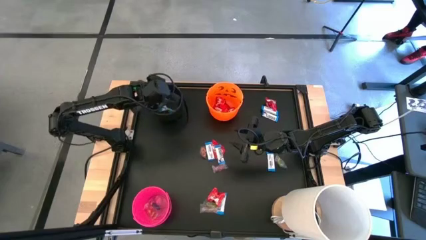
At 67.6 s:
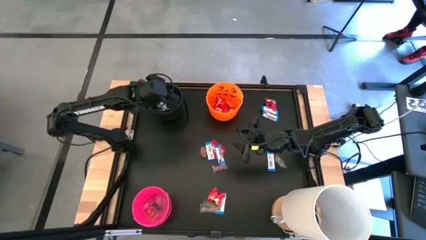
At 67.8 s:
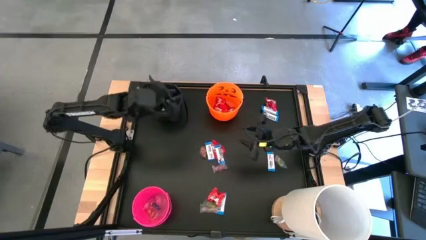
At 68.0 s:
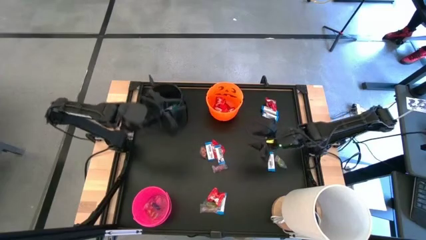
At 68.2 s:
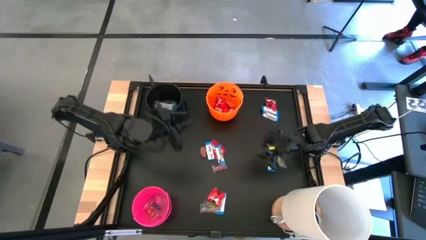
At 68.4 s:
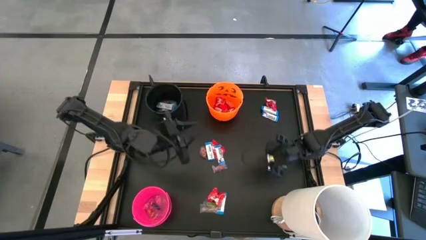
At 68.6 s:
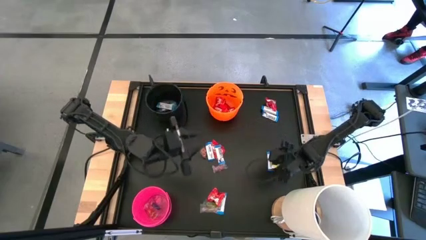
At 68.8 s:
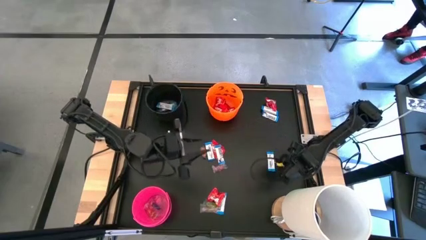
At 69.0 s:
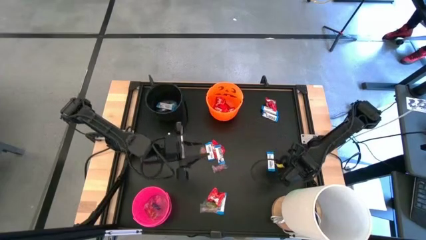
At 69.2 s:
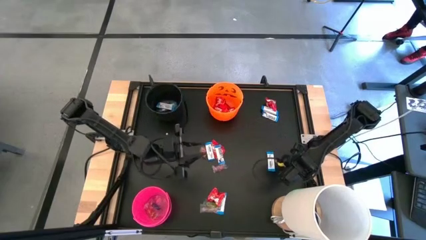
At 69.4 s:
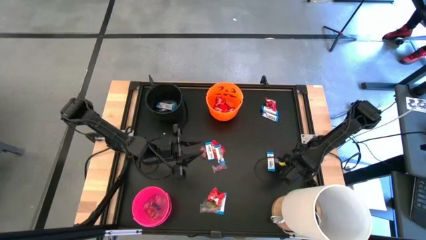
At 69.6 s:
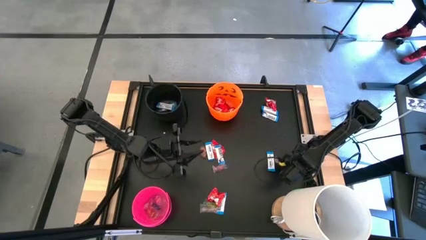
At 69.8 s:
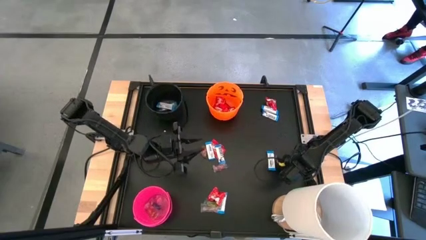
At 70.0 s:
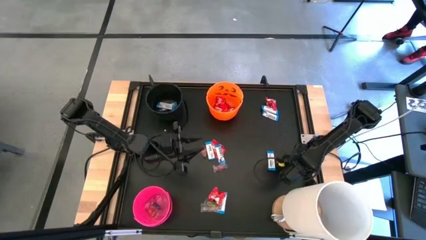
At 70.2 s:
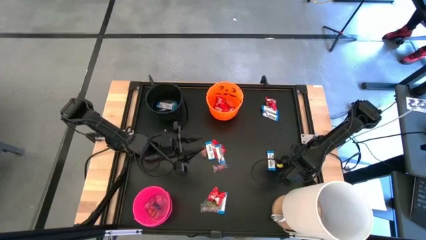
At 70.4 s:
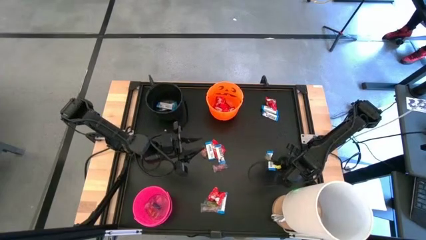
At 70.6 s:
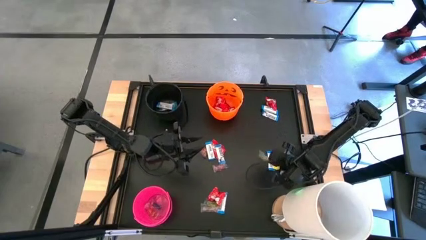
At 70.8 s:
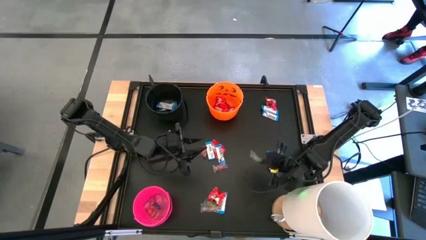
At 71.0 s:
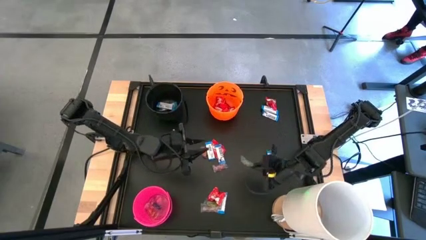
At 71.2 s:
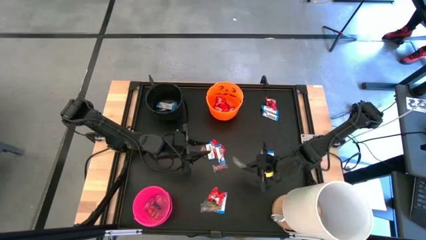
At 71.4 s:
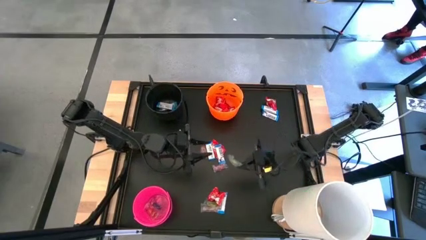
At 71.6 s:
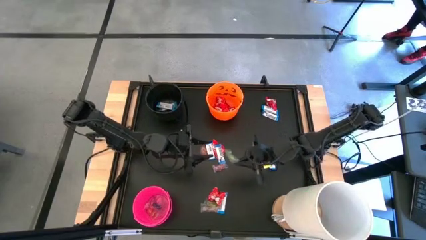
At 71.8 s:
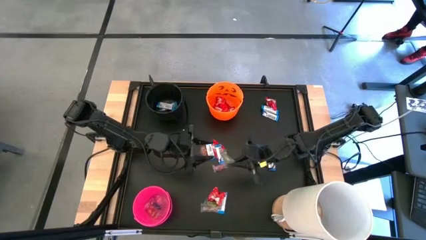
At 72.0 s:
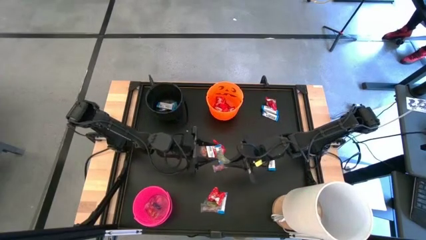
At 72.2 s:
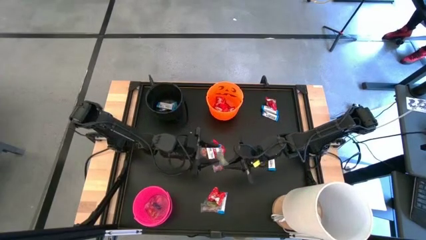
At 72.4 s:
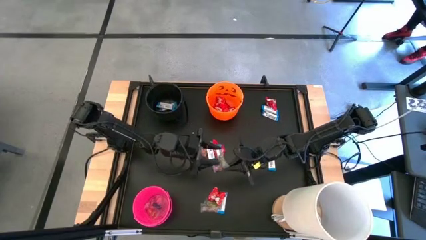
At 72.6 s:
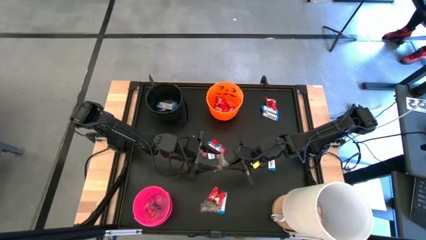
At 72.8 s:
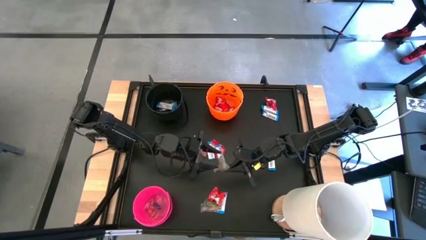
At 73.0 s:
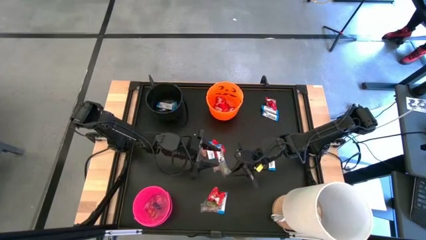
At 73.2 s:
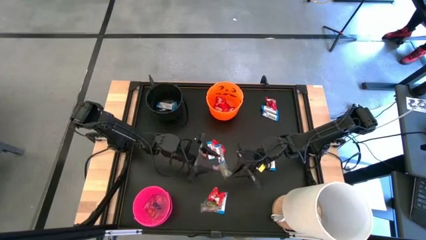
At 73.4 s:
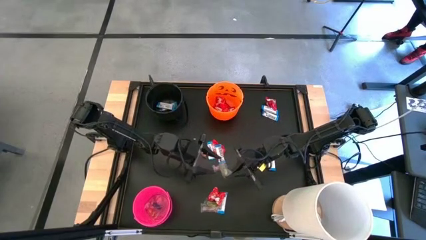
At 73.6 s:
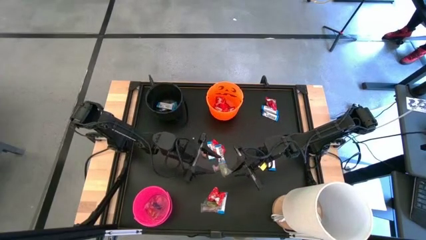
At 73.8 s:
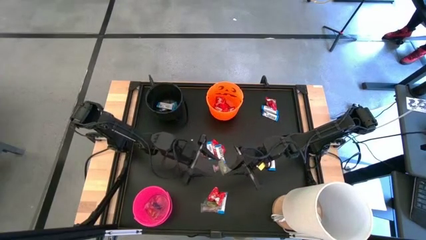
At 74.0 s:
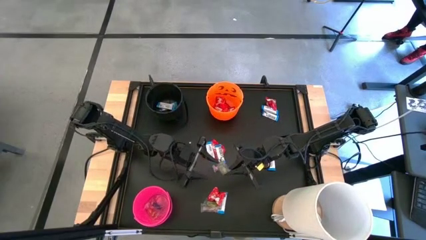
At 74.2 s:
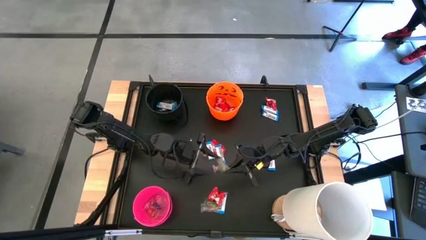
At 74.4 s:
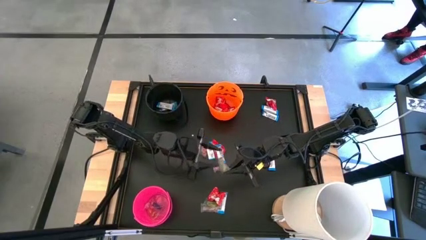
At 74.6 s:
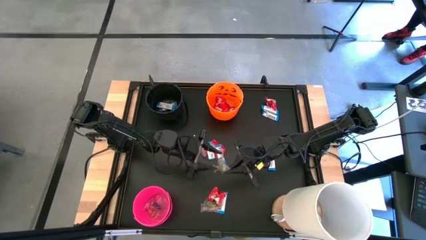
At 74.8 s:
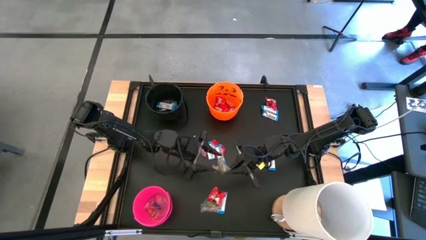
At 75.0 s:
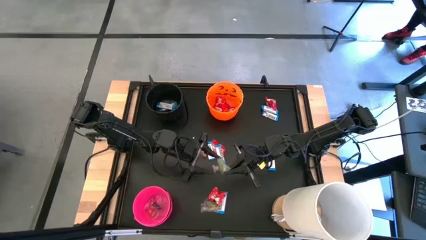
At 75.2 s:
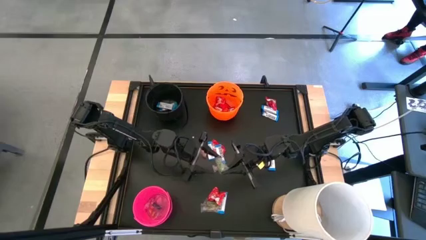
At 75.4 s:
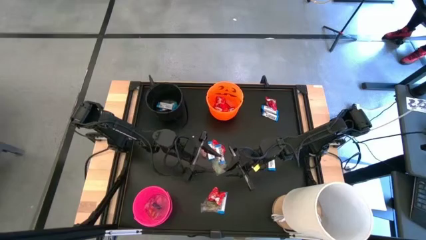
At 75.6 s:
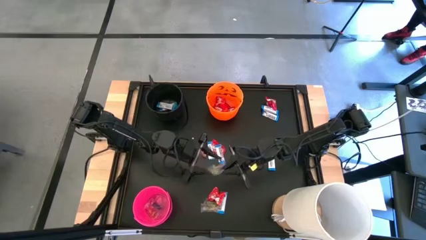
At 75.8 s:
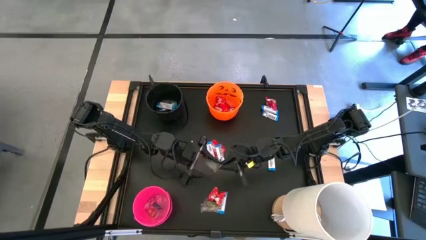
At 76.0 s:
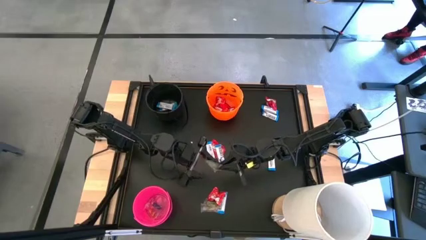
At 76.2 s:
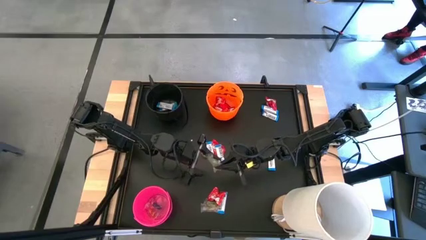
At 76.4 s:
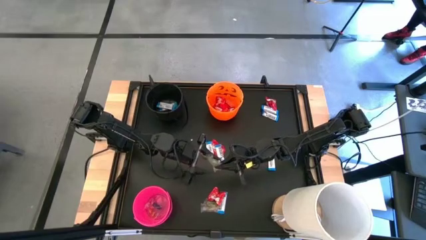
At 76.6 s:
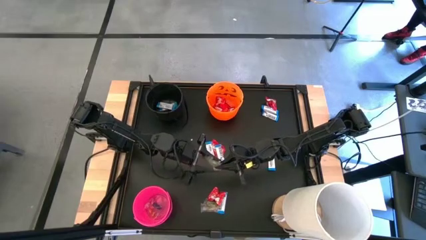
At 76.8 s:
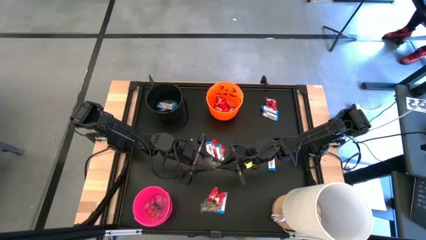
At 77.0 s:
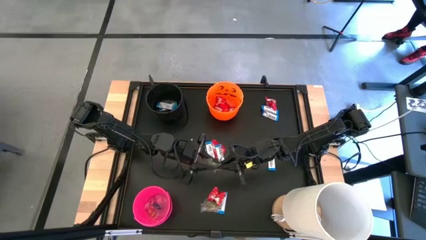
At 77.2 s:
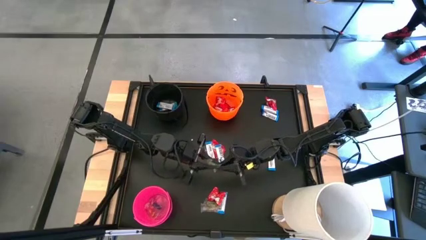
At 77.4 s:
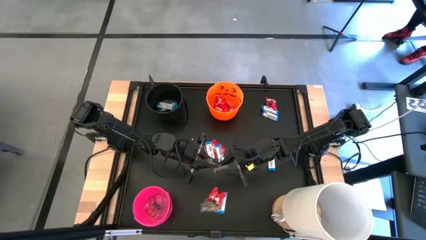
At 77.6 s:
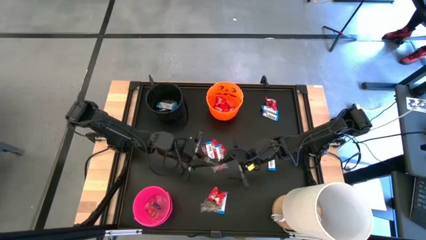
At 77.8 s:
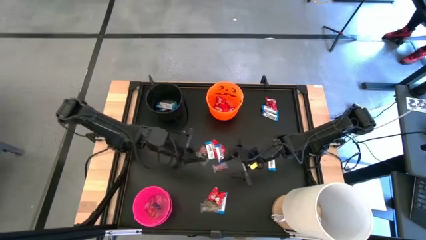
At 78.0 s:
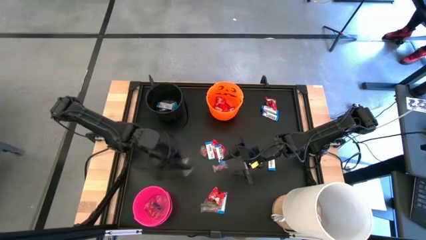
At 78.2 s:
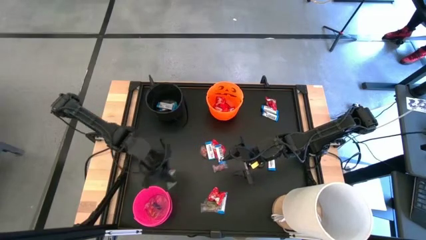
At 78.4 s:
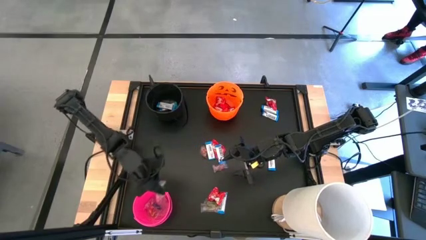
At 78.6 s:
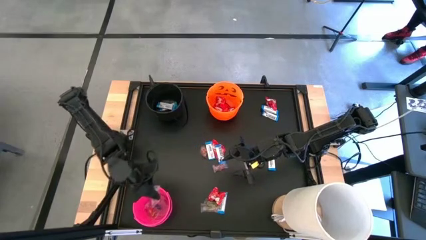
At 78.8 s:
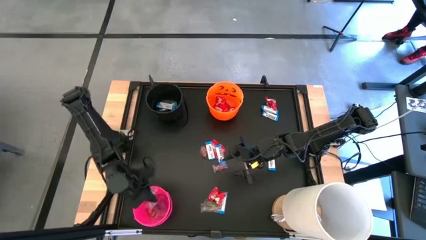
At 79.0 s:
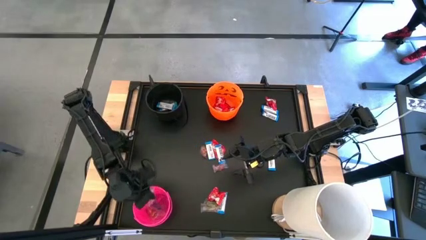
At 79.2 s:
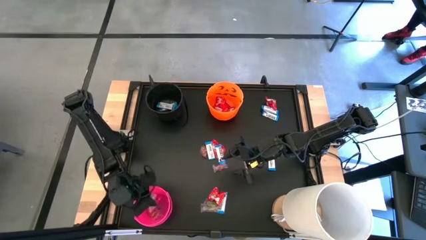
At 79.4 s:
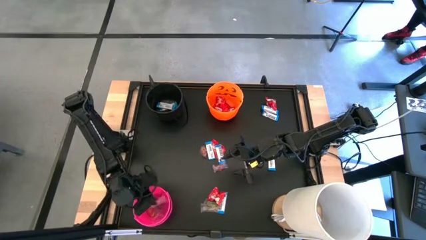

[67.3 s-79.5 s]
Task: Sort candy
Put the middle right transparent candy into the pink bin

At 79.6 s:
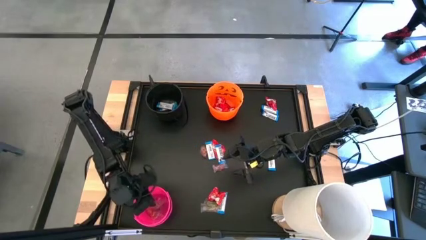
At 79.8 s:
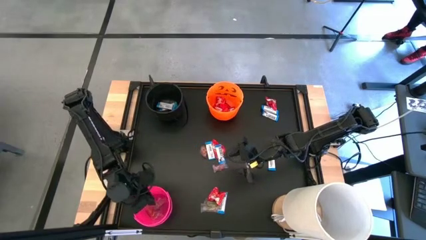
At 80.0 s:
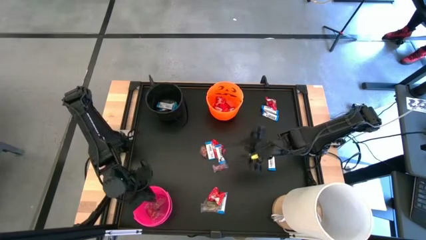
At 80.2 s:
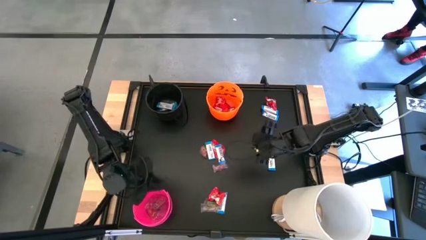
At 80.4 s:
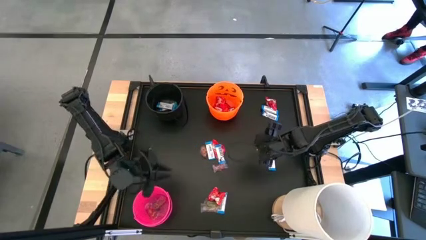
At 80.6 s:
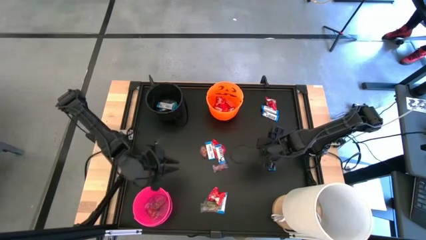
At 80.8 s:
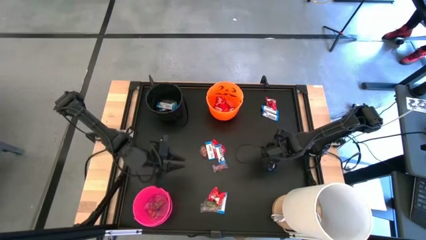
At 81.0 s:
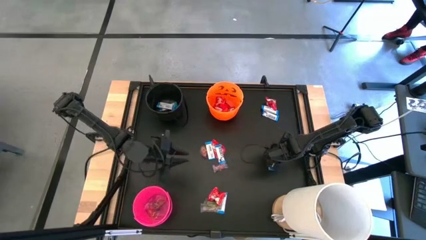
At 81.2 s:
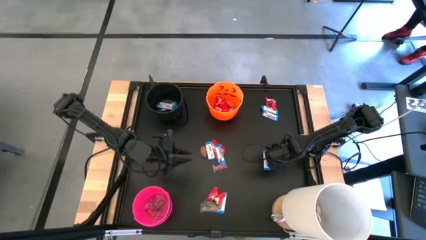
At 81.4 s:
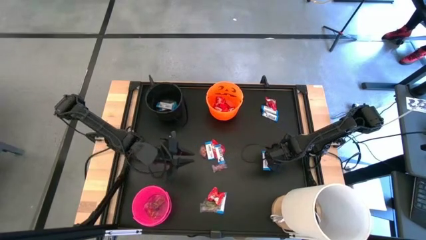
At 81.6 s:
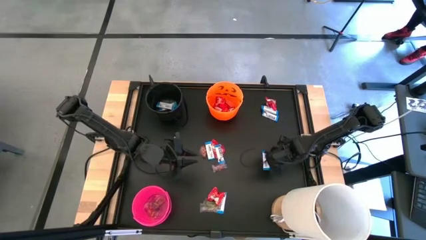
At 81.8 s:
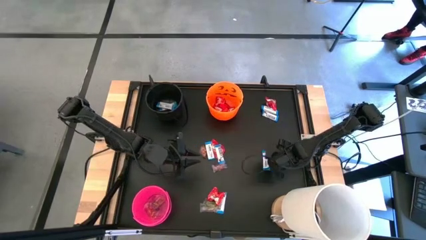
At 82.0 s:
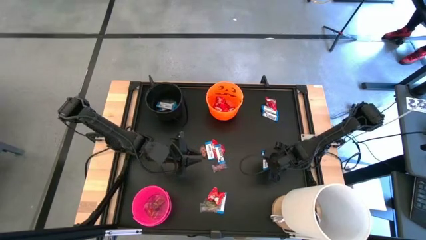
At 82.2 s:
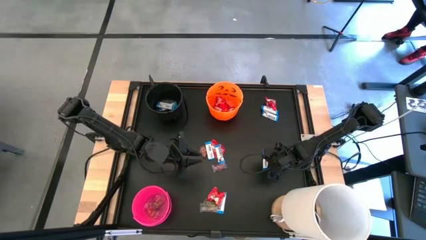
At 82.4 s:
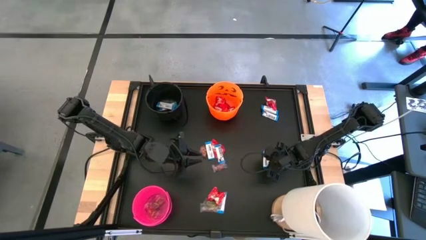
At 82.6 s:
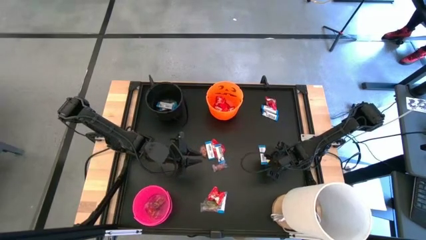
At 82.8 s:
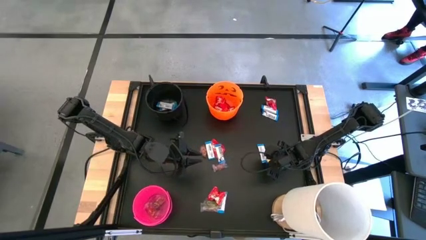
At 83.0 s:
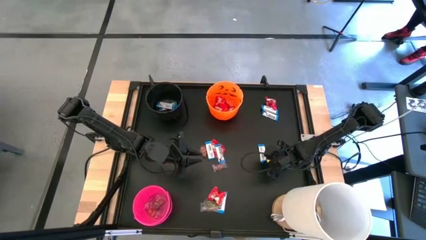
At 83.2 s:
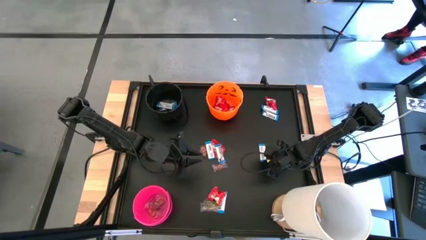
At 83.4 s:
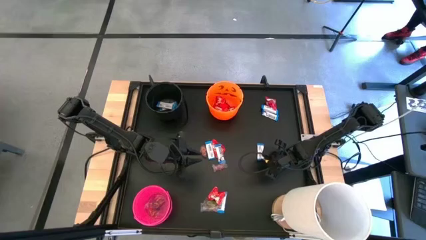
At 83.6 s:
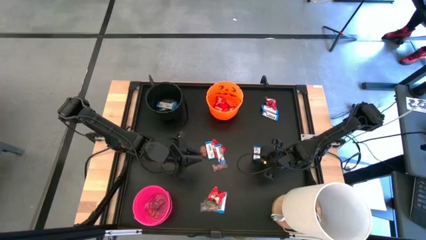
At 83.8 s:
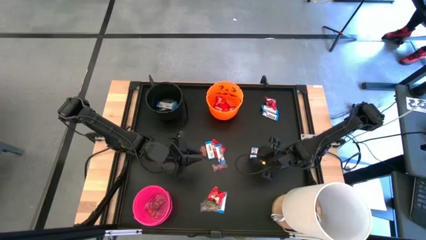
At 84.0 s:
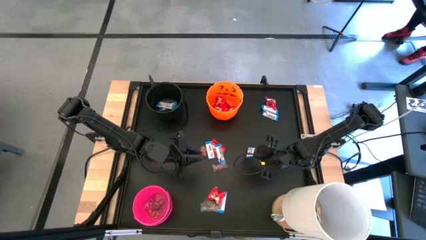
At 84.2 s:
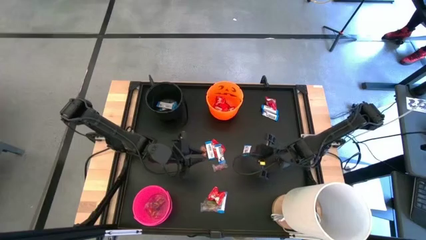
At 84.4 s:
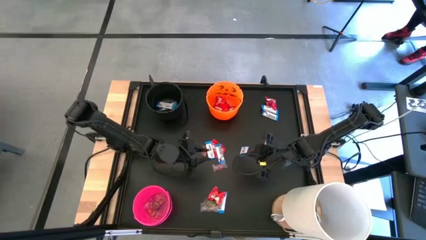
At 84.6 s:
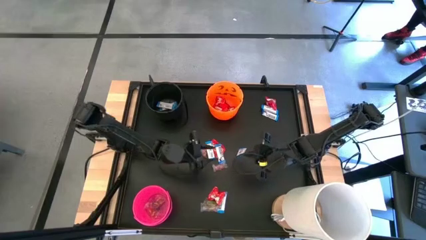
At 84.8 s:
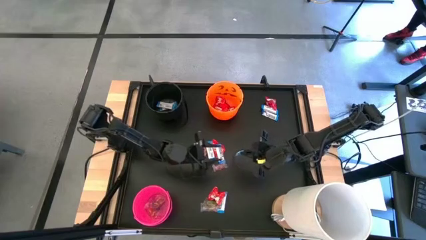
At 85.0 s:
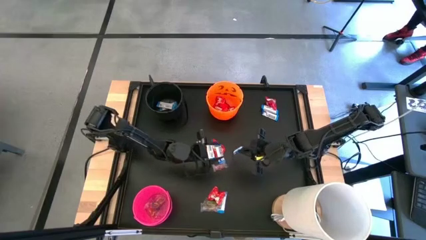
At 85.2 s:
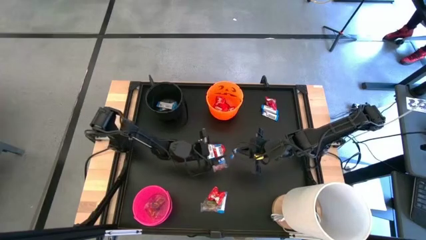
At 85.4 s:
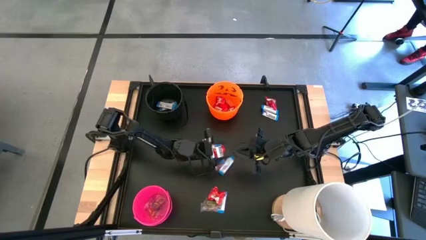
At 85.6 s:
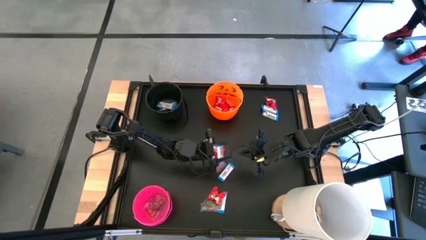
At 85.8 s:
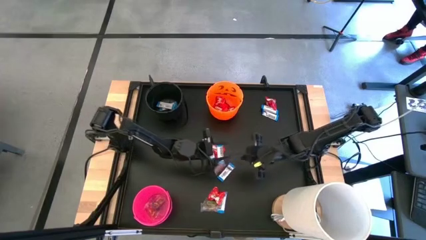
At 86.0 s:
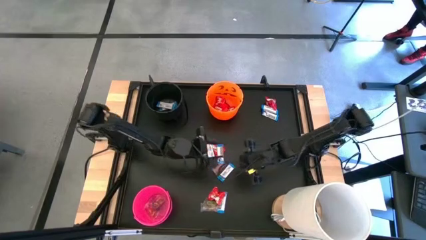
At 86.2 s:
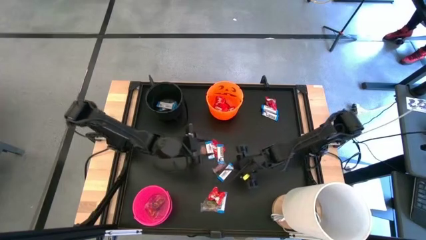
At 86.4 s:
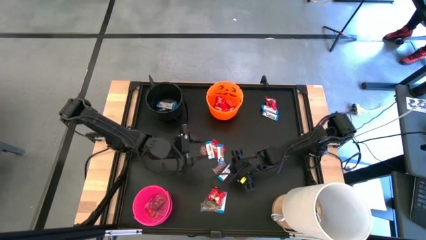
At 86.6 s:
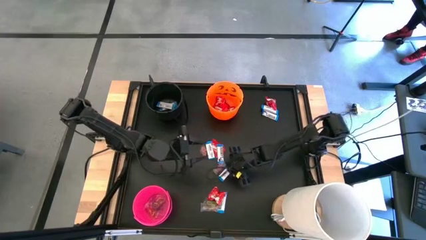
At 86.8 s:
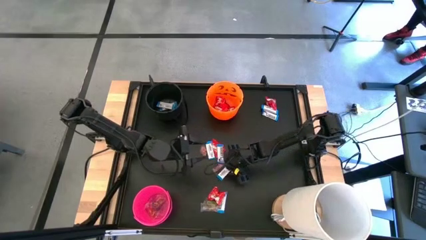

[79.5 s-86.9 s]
Put the middle right white candy into the black bin
